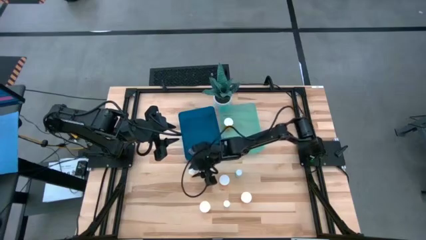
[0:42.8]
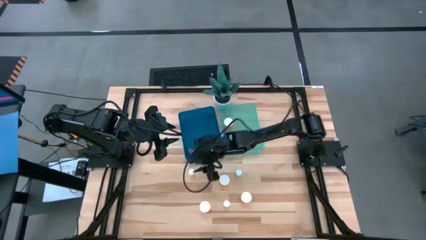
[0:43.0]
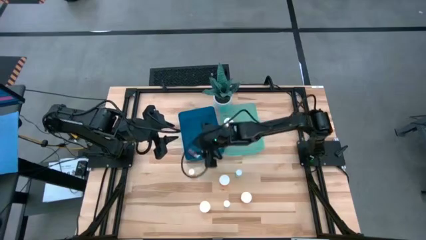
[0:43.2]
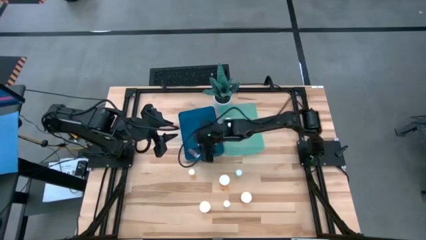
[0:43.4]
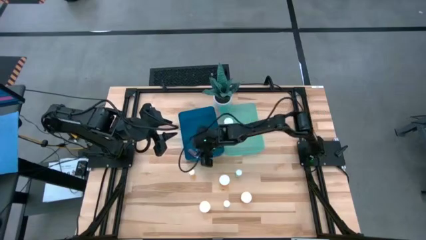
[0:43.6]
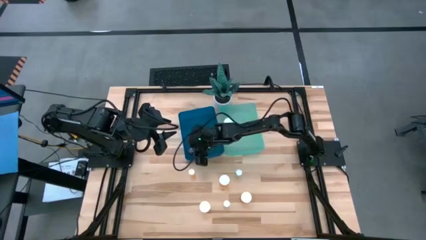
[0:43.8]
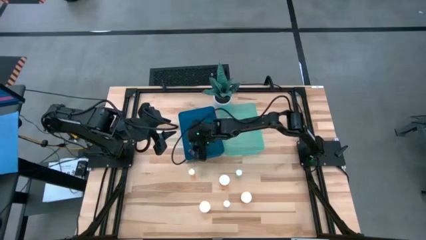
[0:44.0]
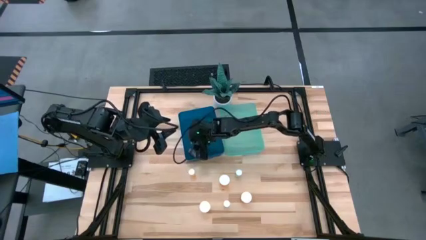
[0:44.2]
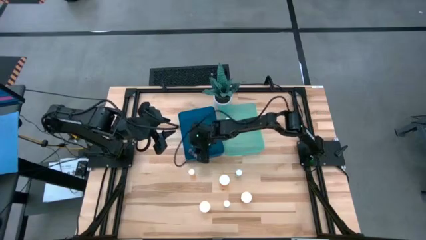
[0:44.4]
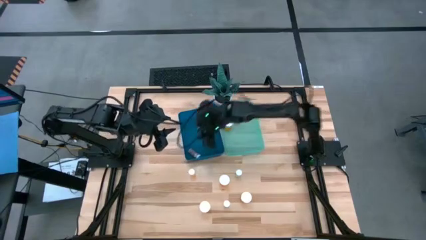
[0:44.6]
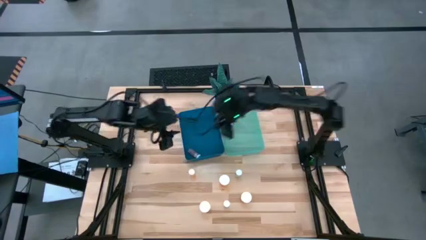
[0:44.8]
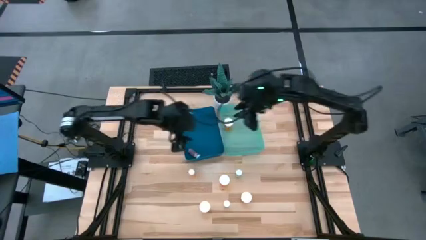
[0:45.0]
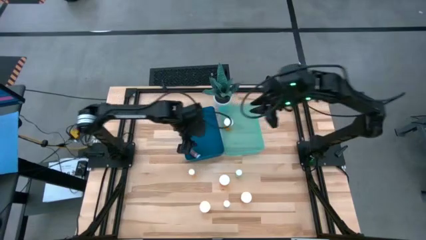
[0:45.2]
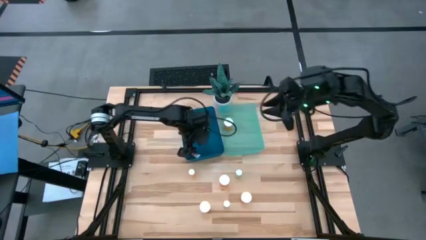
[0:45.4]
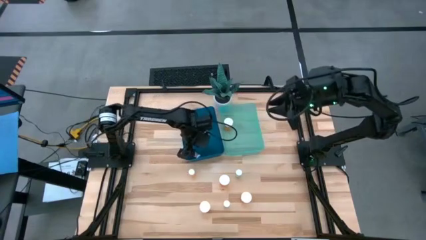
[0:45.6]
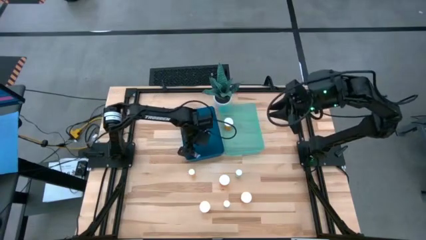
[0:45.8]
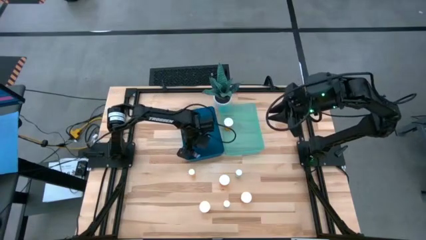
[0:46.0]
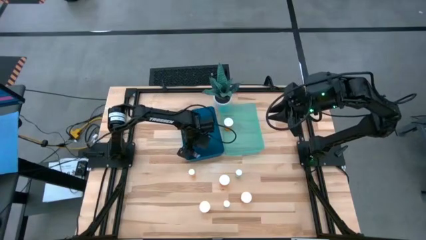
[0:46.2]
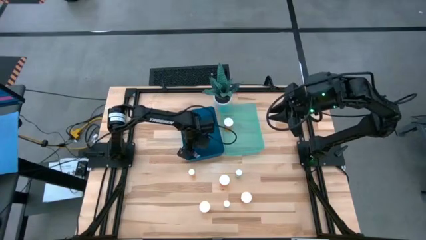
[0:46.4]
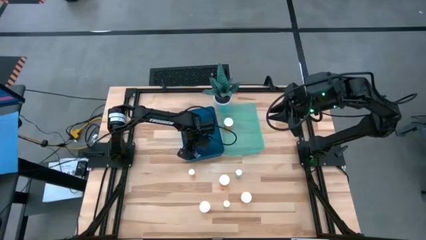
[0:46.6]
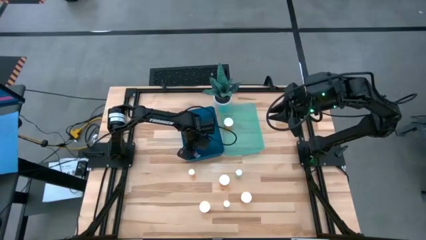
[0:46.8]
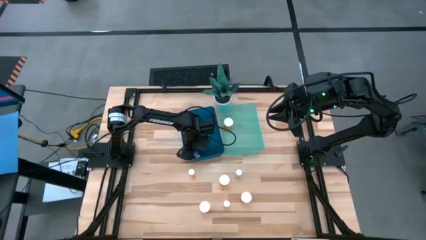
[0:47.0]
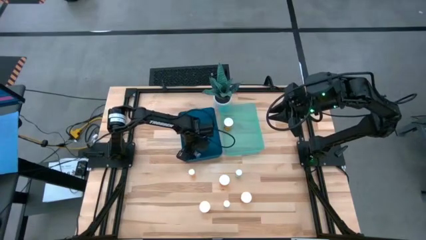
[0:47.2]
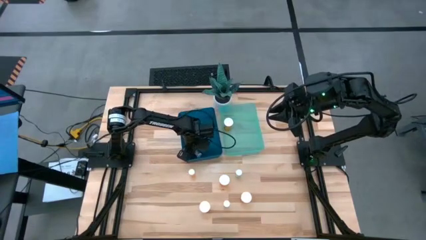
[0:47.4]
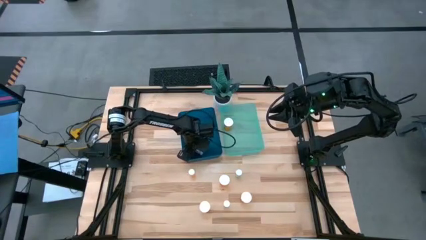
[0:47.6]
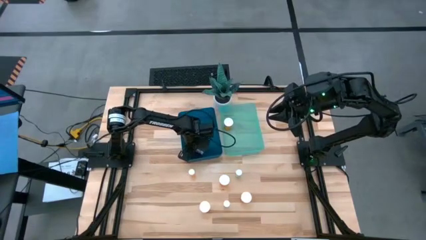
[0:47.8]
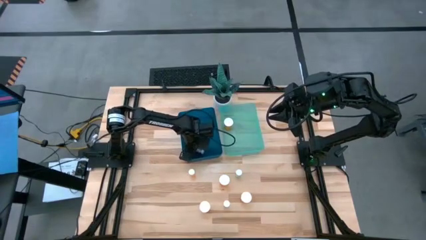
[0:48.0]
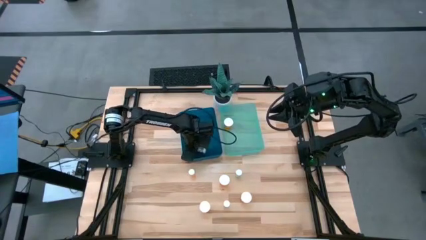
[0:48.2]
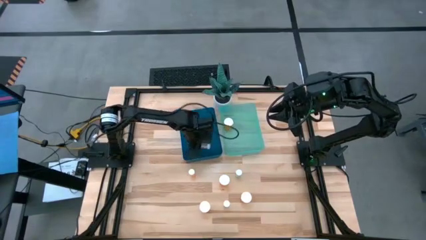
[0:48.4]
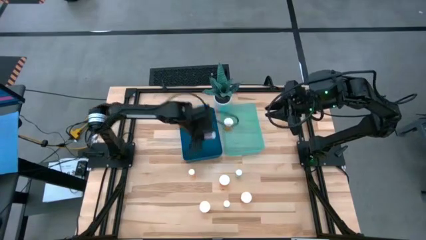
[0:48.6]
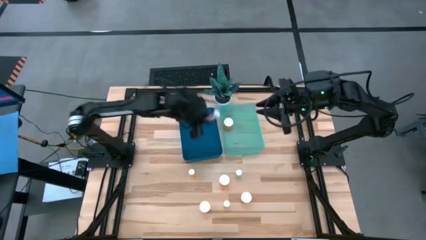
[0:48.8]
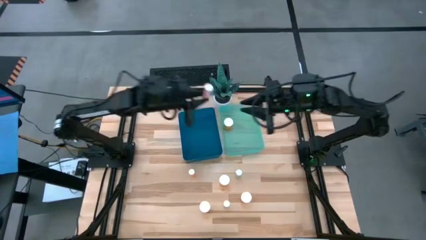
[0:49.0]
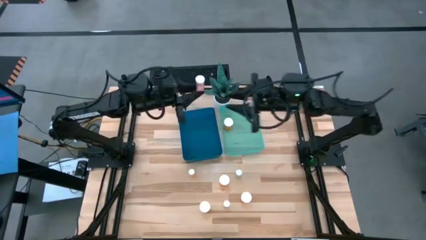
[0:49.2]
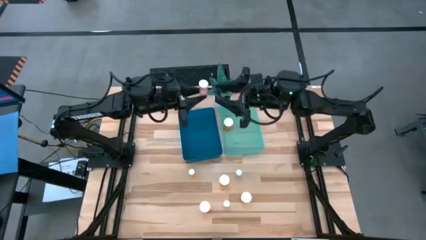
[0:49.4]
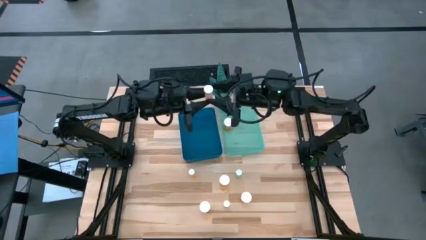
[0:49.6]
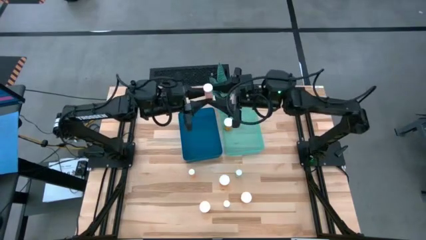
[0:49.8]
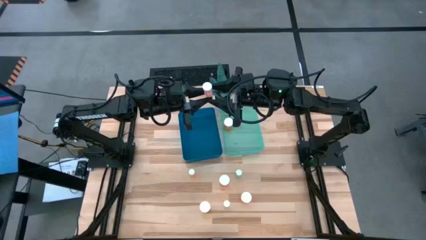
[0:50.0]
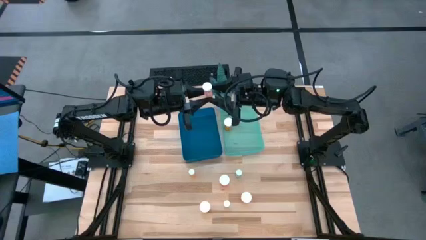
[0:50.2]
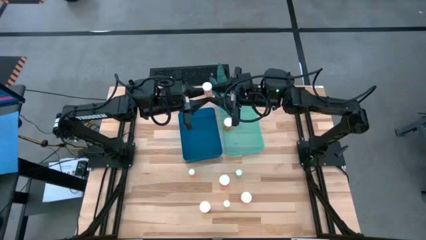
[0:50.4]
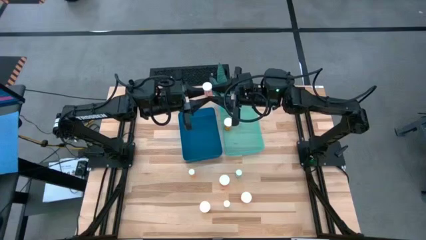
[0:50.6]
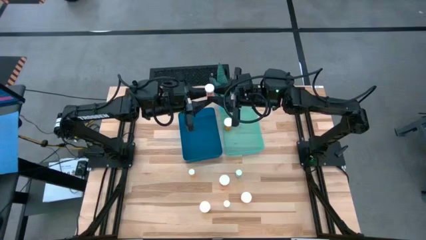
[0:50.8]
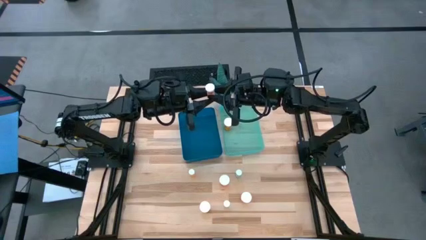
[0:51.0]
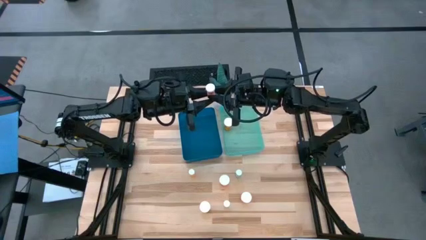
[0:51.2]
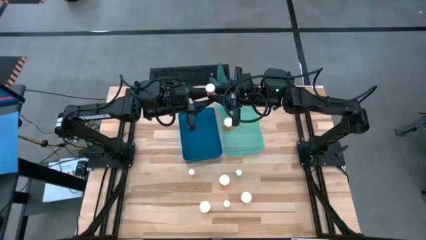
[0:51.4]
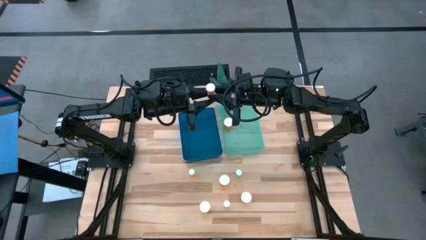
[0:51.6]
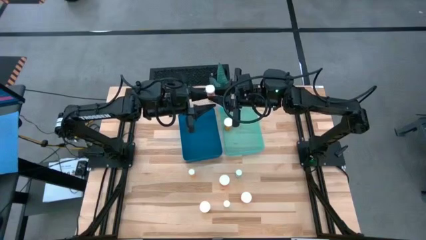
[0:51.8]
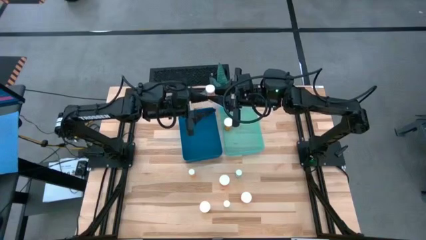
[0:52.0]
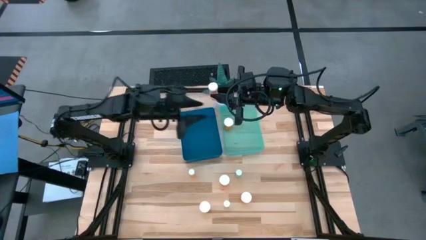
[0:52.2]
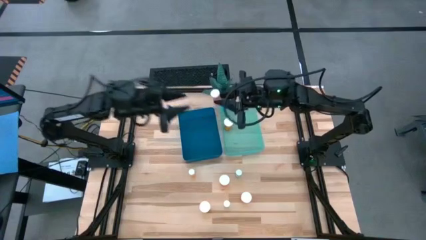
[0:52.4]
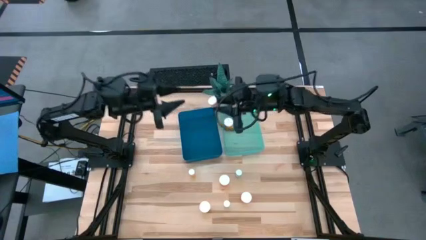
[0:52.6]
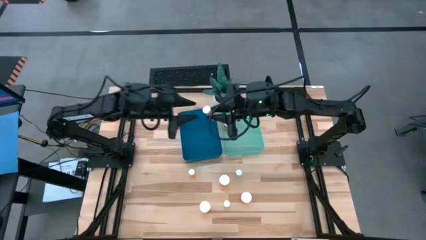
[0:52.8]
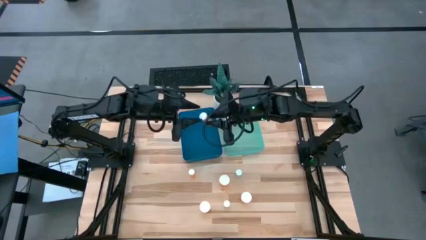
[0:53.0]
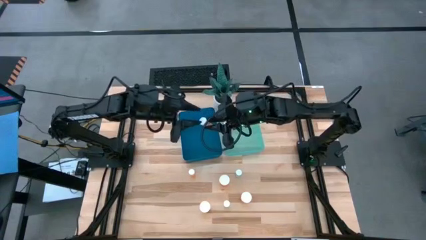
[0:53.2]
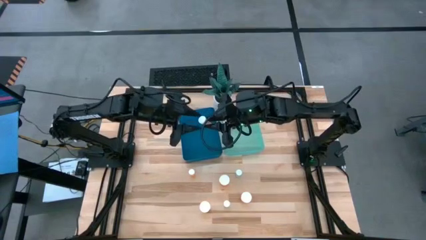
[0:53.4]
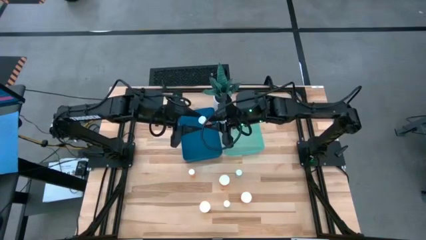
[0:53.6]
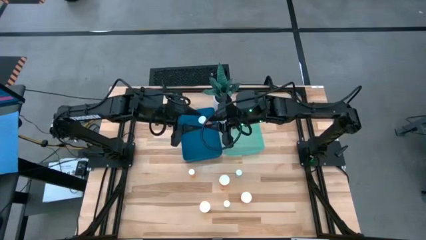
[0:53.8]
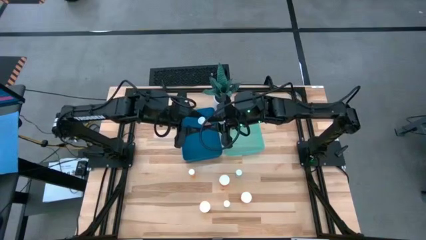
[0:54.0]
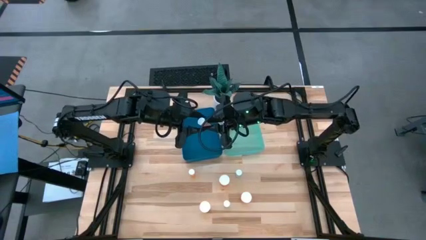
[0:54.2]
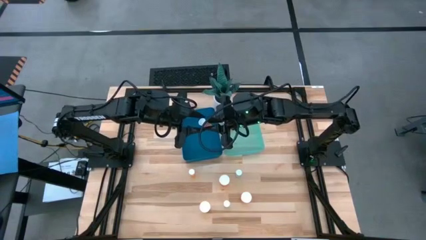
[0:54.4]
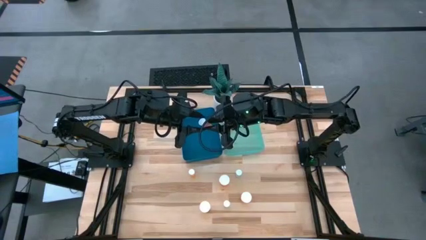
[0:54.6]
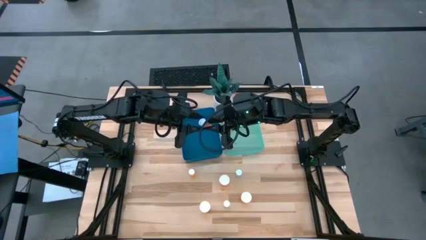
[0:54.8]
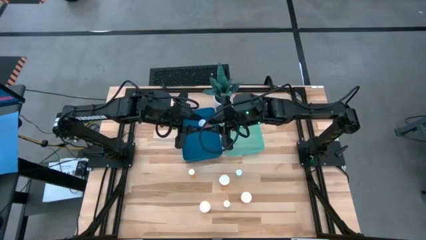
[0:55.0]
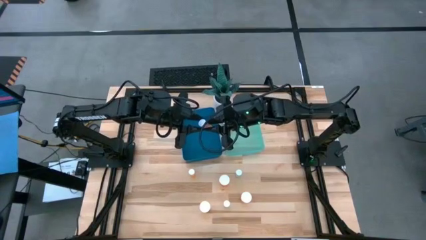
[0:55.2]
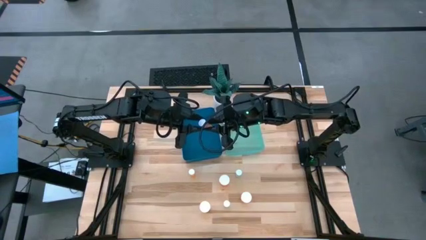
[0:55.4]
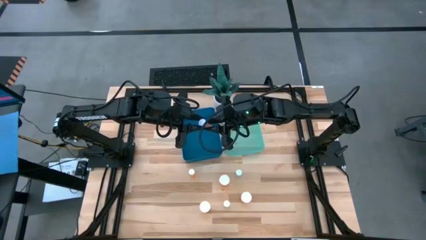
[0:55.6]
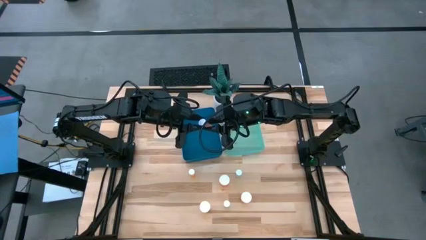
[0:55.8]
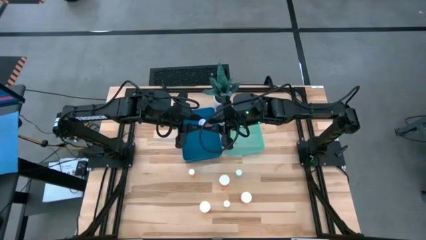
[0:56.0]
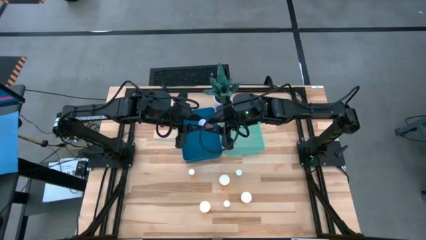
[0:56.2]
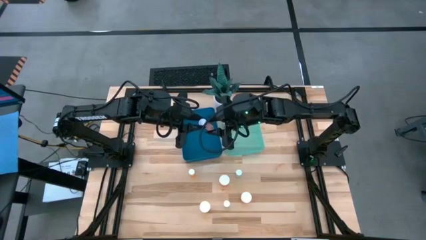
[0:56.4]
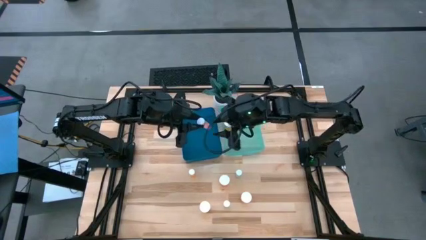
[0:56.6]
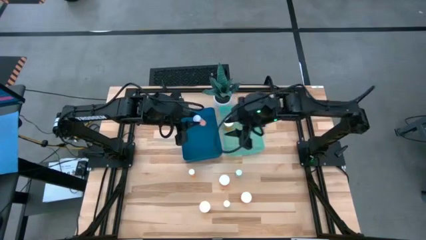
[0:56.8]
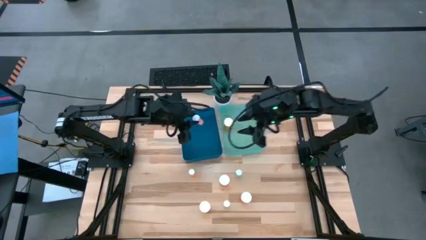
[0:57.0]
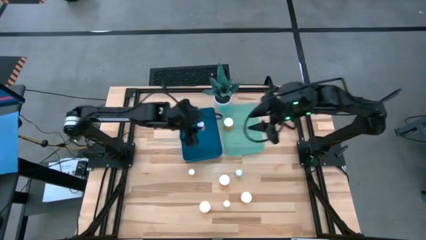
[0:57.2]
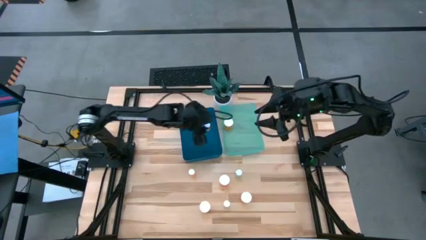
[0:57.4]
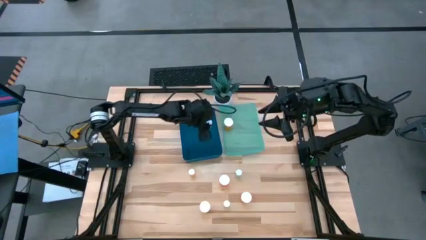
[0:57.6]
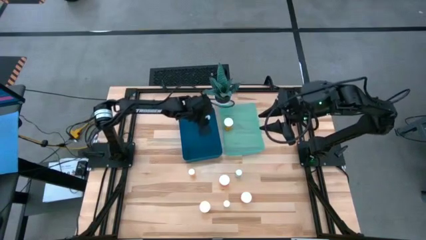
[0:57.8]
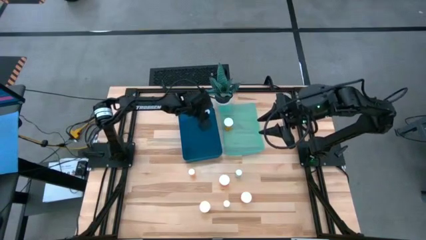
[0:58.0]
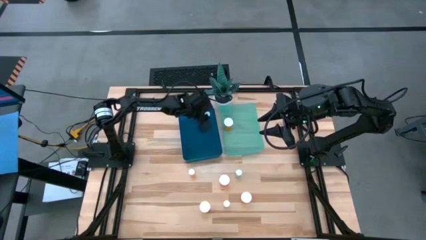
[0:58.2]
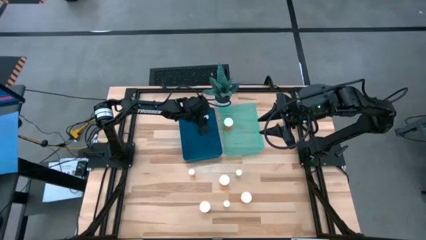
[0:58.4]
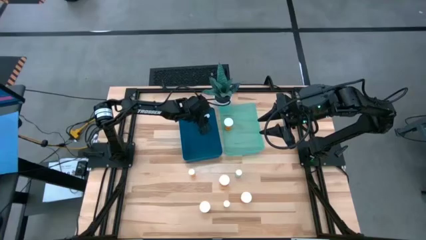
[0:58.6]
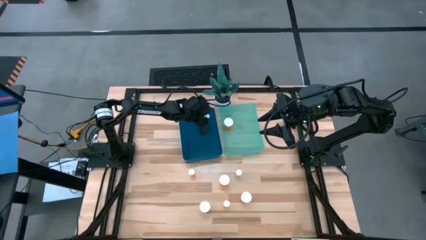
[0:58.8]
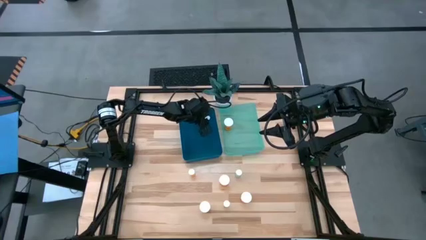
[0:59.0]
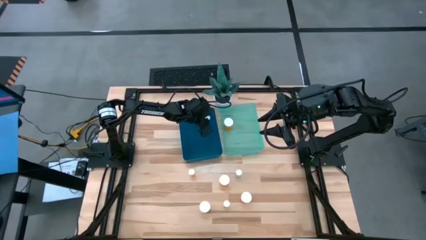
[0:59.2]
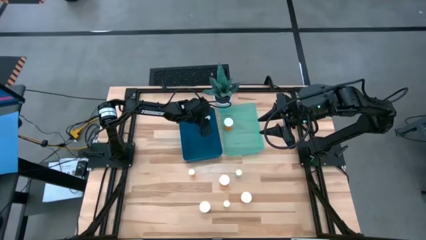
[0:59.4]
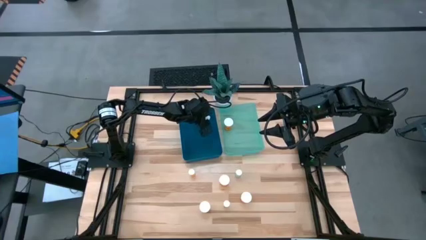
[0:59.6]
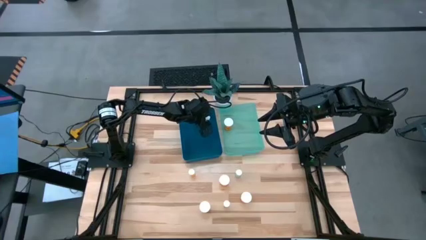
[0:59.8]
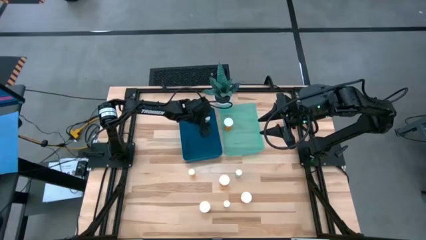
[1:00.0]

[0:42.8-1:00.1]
Task: Pick and place medicine bottles into bin by pill shape (circle, oval)
Adjust the pink tablet bottle in the blue bin
